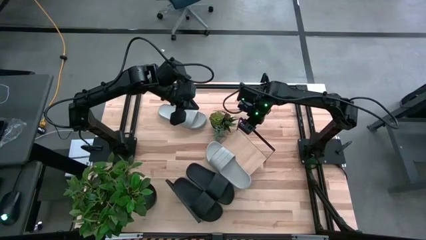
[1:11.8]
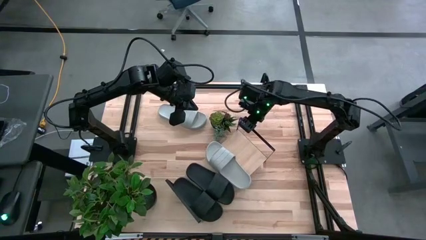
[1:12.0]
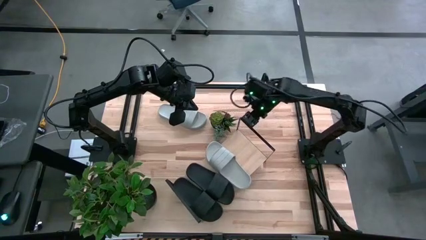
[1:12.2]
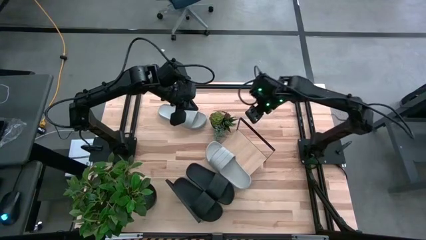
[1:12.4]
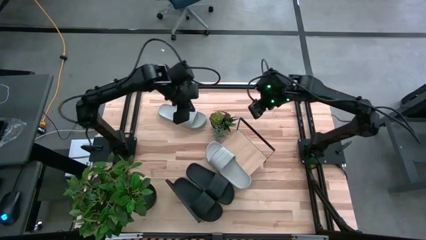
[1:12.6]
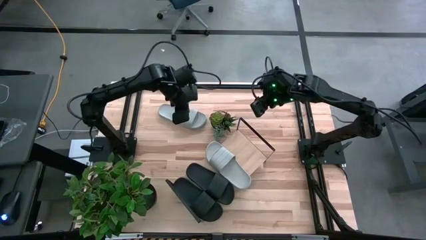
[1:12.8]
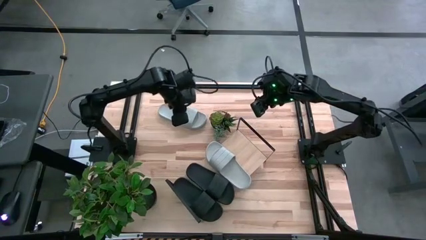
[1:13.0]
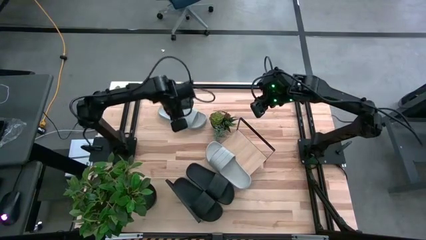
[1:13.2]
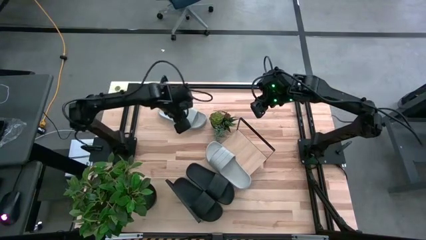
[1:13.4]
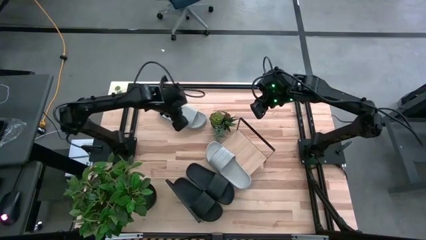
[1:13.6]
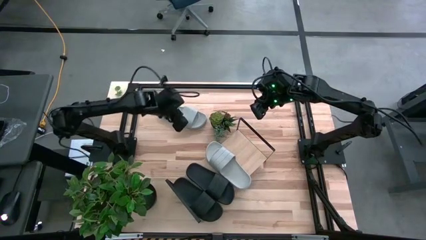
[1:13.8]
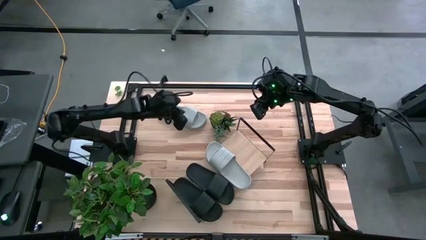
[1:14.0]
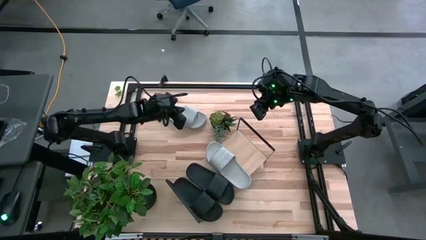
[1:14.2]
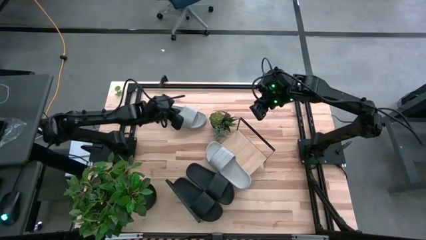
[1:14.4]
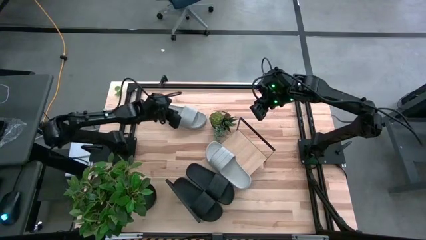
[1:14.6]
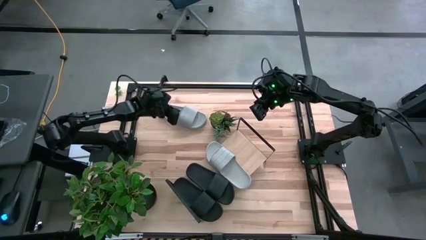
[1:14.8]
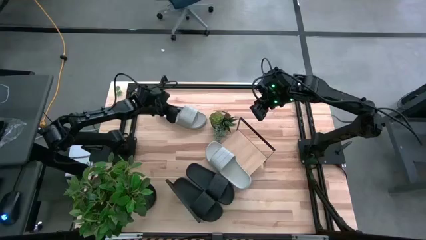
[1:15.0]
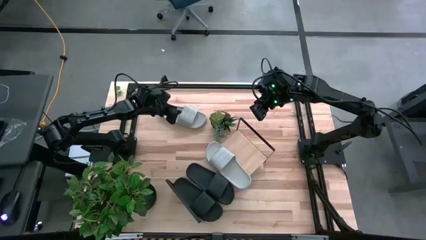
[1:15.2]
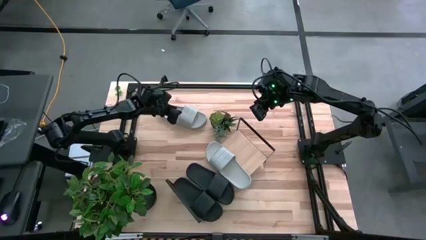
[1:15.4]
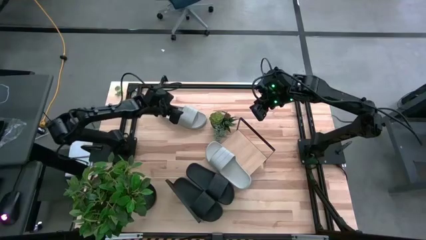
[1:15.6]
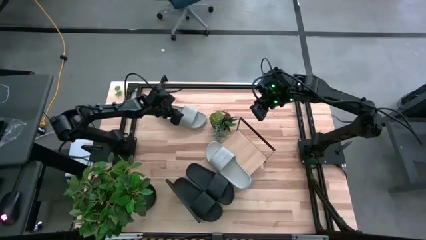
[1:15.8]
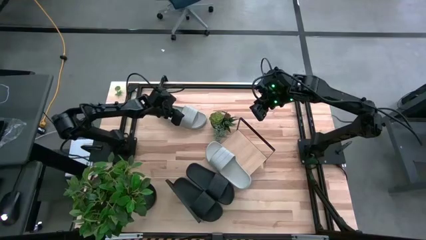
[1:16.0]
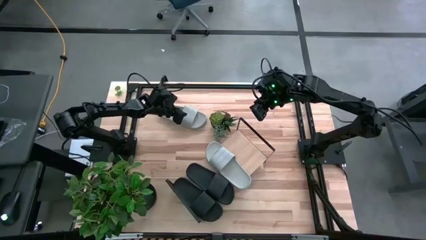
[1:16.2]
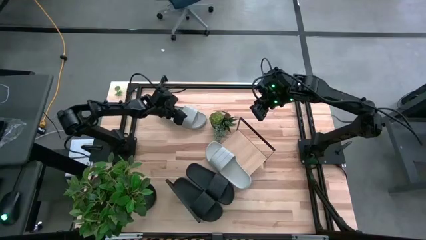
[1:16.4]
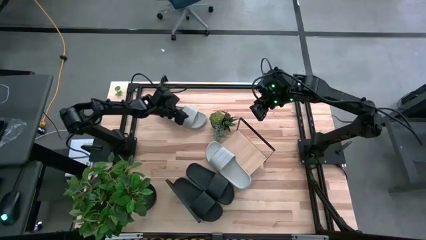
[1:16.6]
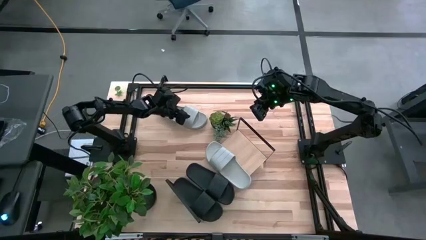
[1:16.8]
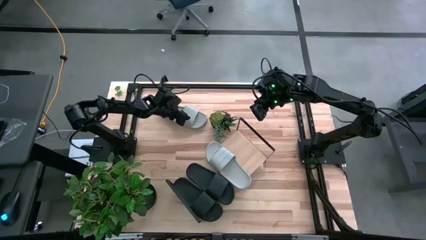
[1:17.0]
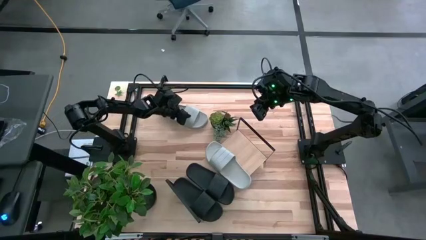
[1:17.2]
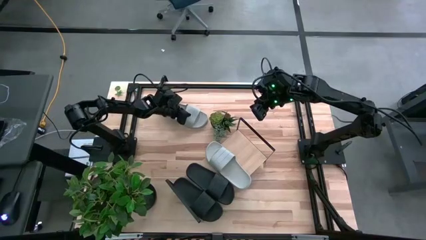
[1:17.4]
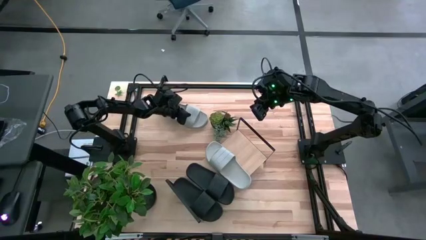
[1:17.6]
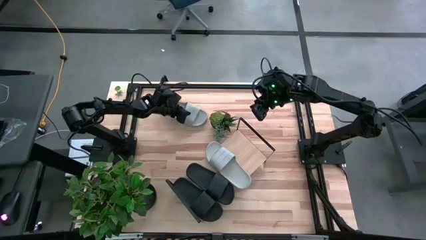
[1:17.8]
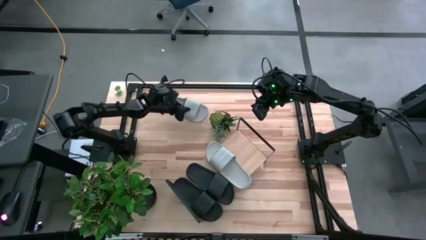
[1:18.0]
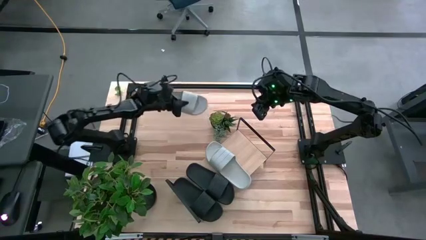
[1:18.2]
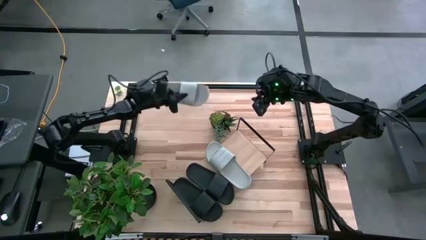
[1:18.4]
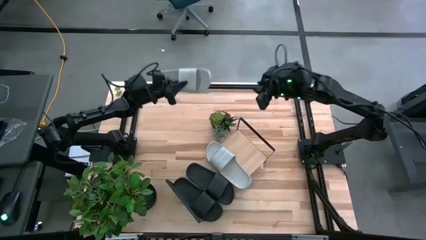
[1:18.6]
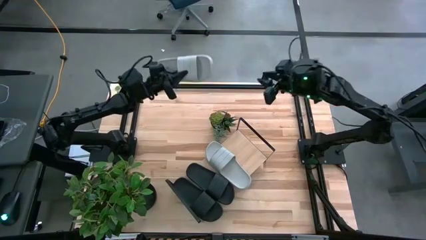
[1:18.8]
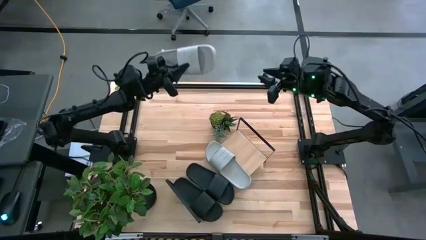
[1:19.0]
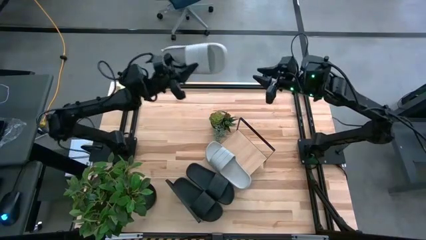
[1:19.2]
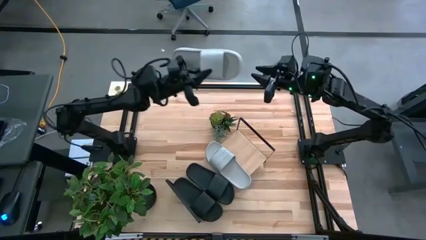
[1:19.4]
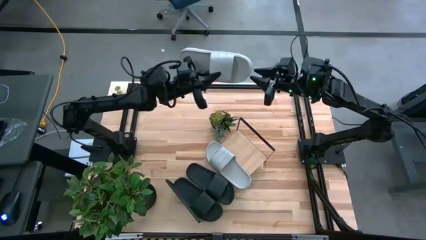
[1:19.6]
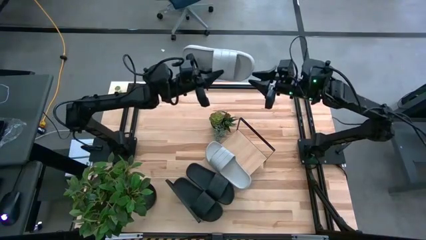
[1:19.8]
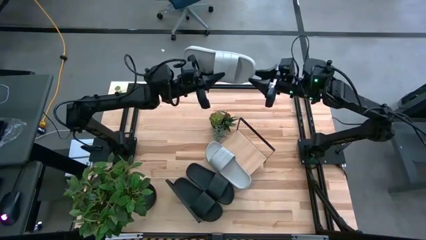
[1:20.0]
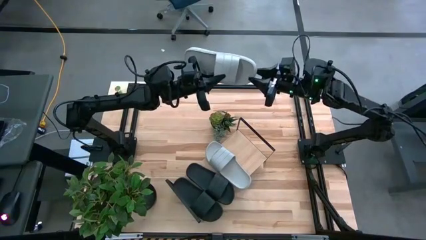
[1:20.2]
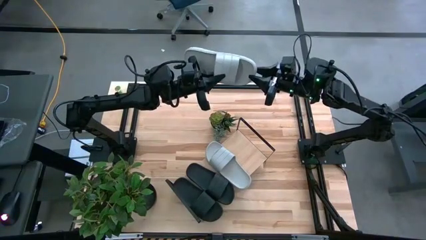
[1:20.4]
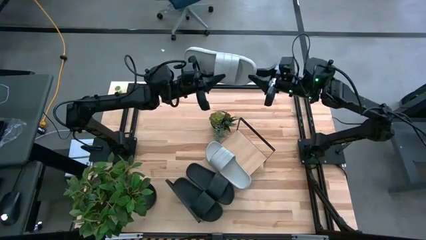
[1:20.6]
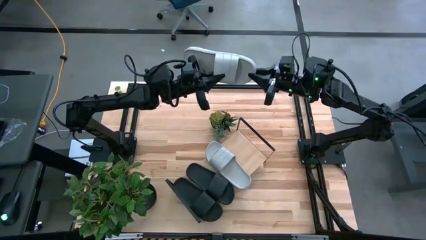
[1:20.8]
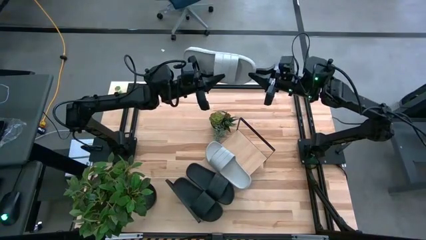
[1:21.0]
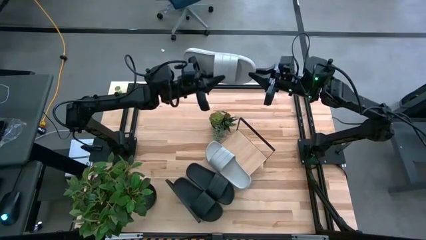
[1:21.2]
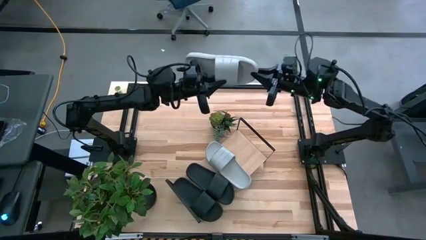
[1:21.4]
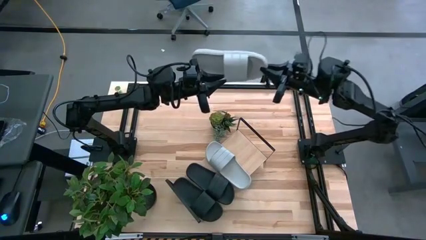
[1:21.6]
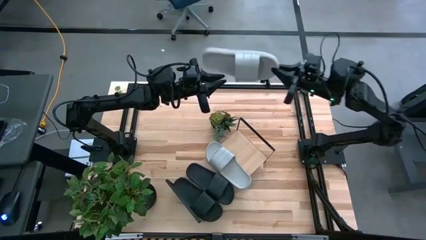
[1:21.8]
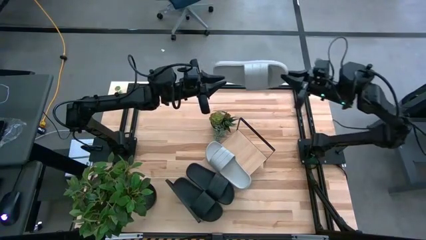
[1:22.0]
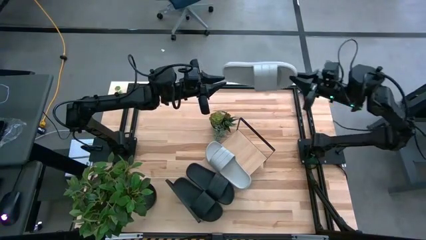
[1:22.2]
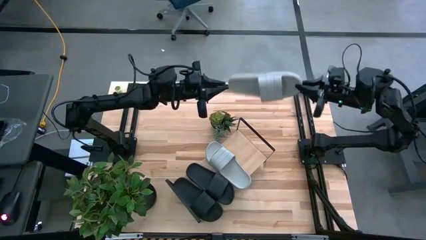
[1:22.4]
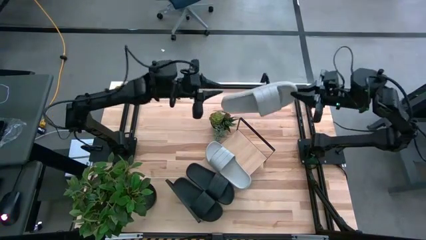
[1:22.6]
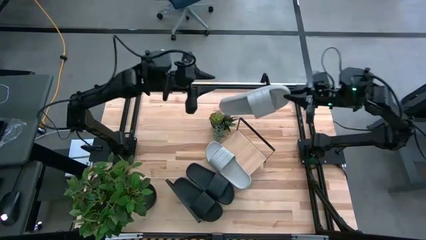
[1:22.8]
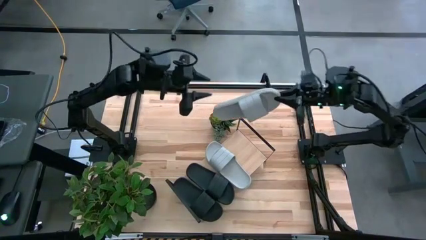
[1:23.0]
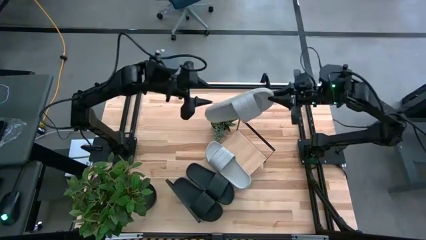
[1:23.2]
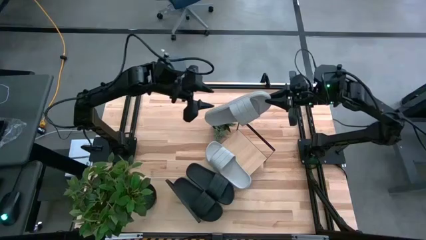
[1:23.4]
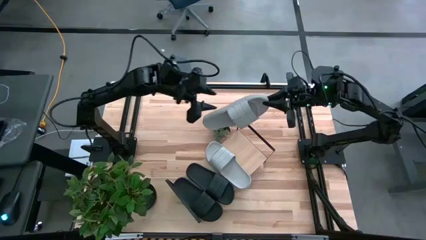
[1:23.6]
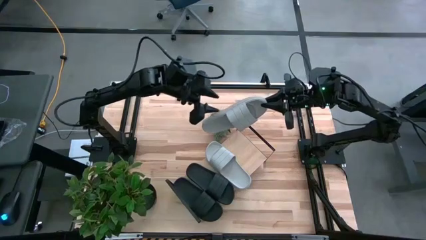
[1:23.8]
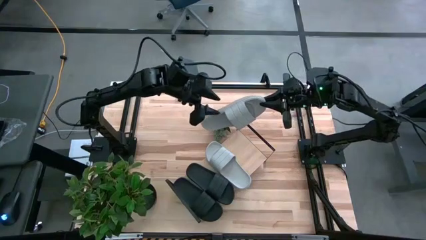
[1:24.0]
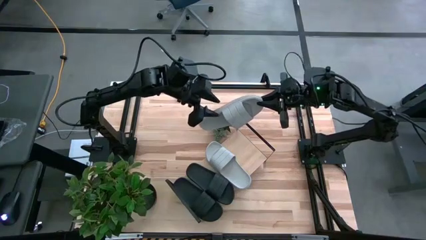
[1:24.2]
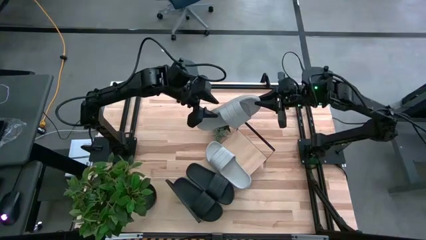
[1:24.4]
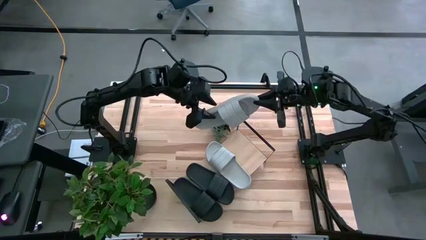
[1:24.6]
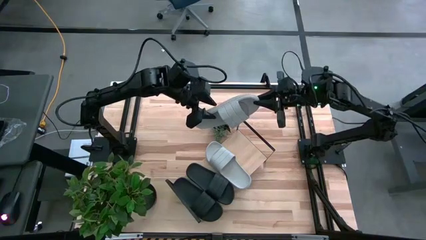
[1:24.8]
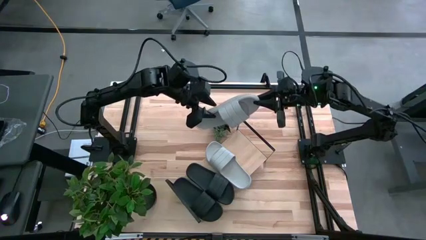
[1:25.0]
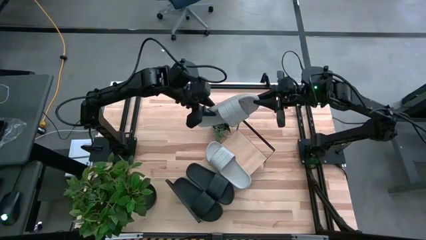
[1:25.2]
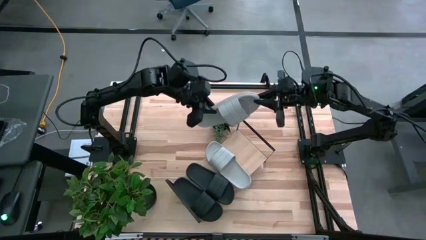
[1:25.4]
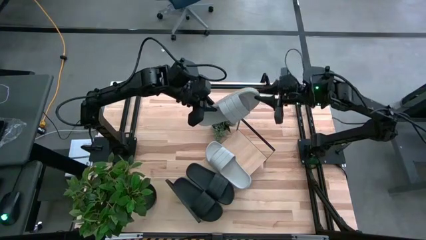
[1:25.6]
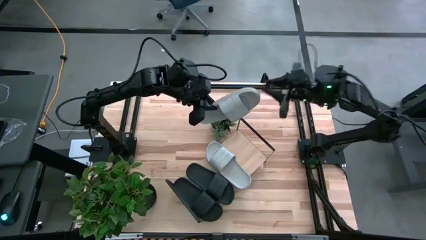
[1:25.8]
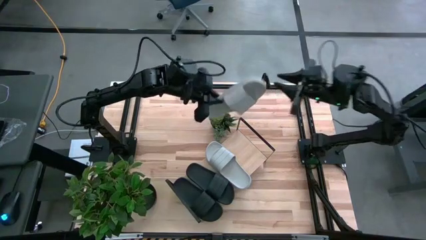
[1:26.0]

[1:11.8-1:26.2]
Task: Pick and place slides into the shelf
Put the gray slipper on the shelf
